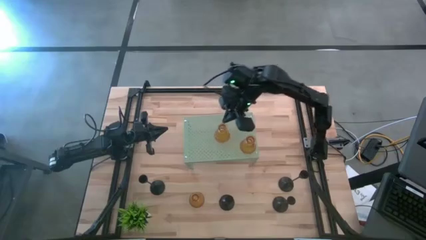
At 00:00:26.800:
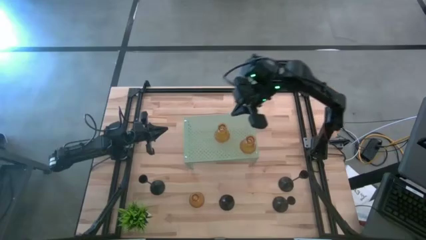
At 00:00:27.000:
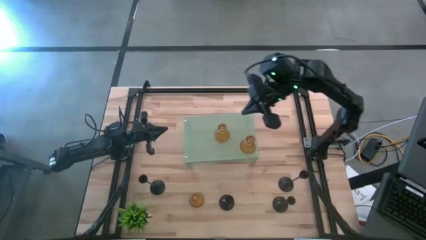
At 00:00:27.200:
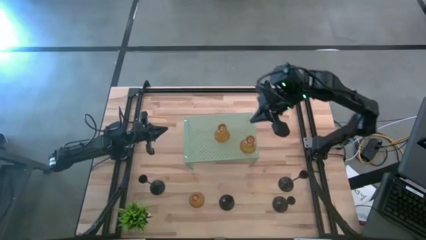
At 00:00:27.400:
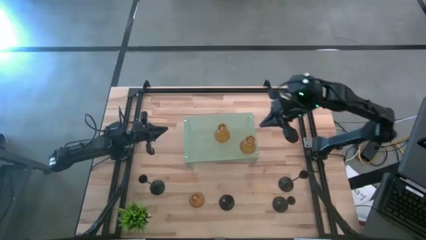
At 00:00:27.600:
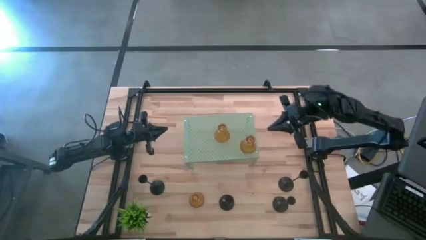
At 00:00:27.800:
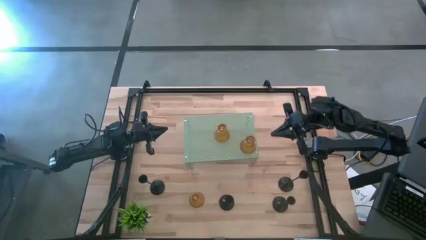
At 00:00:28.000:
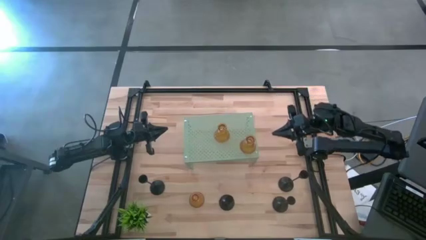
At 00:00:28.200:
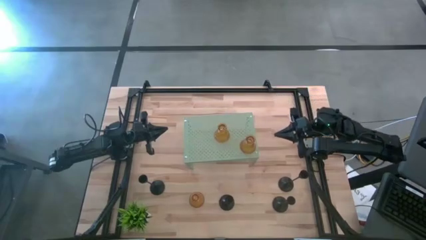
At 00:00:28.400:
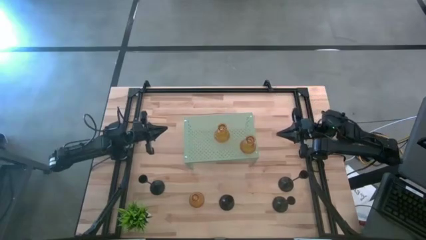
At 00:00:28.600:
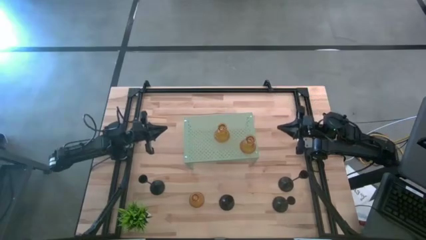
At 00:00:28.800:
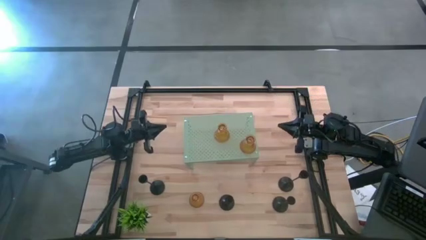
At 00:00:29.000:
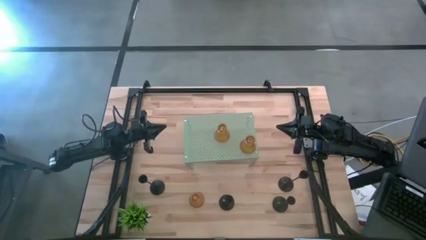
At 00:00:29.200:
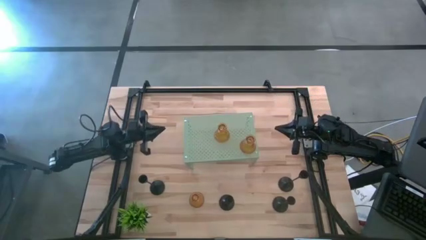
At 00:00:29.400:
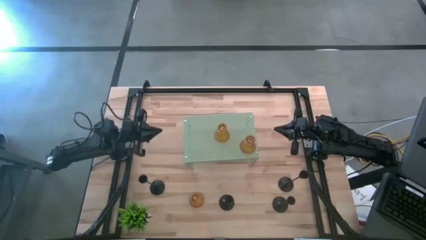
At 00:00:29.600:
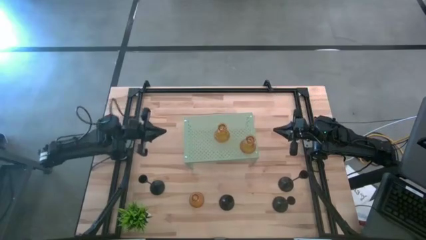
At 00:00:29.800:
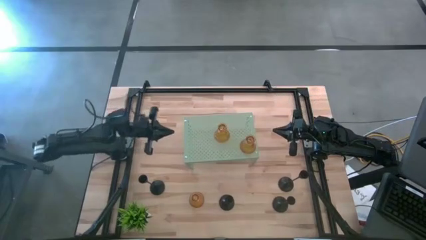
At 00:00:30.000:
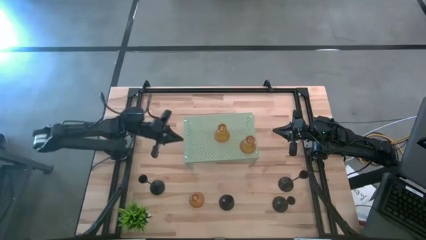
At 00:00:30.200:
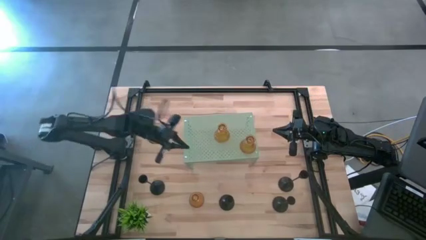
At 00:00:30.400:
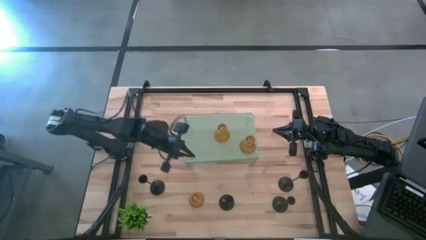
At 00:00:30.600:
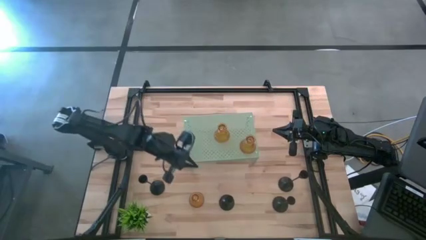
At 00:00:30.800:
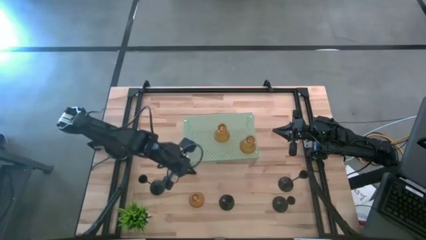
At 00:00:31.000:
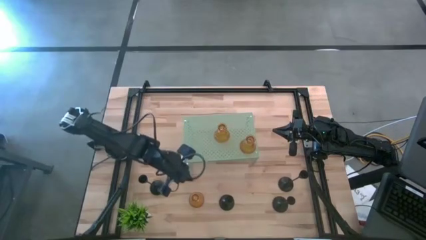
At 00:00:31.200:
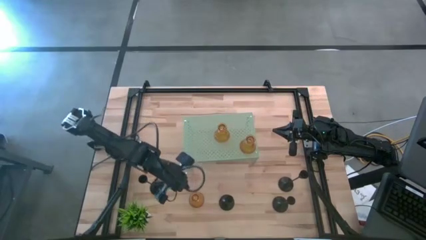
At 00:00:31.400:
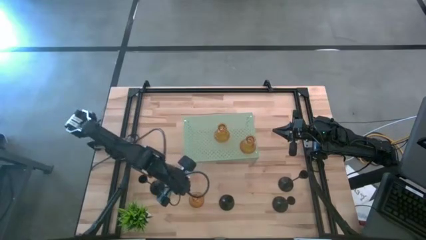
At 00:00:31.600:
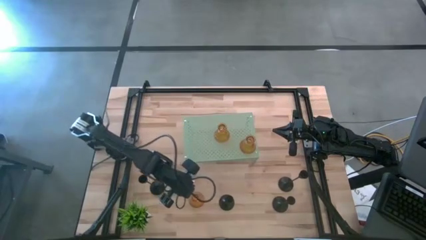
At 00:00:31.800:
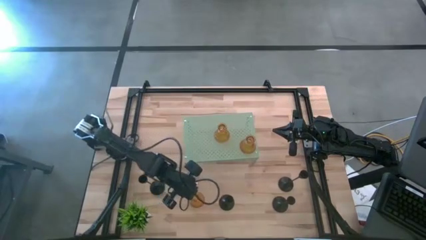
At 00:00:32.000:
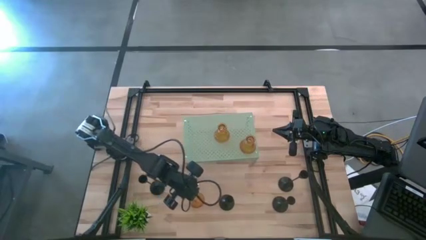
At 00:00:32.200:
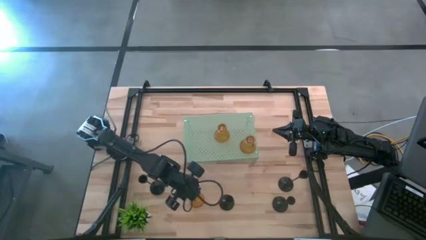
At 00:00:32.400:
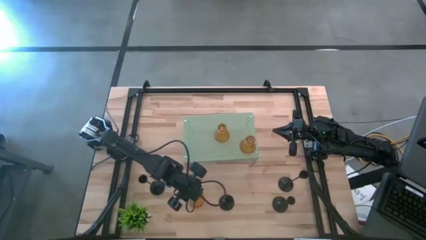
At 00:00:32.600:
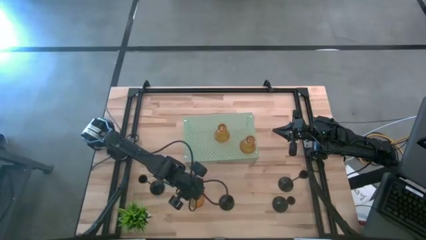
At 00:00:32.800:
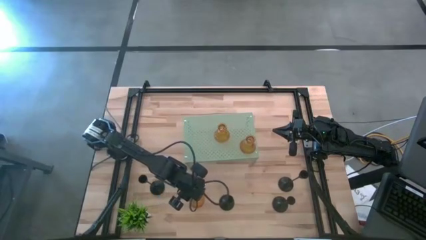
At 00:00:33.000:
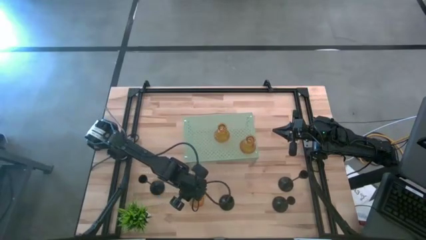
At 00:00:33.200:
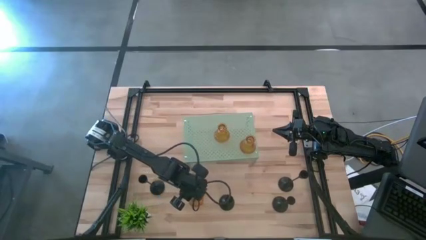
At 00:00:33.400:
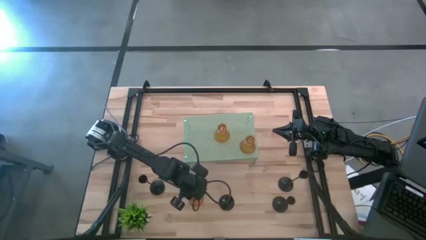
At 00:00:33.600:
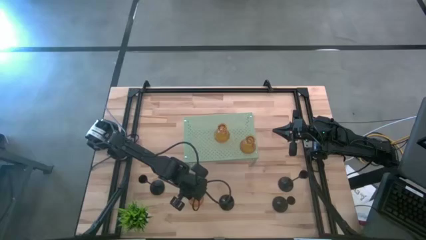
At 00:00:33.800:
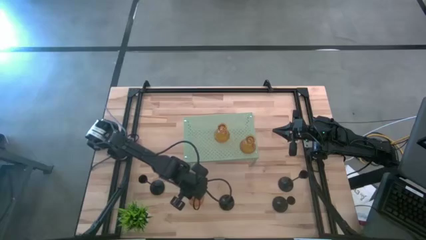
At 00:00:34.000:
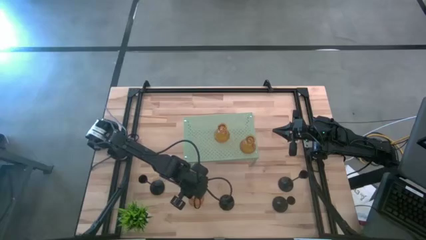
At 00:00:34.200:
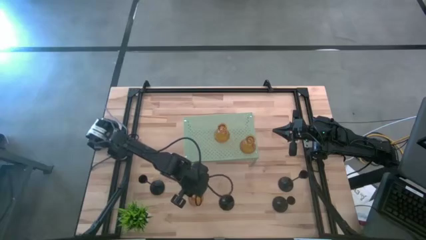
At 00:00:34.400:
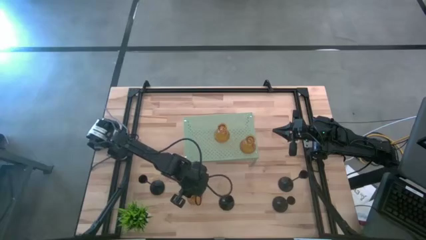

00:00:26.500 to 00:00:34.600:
Task: Pick & Place candle stick holders
Put the yellow glass candle holder on the shelf

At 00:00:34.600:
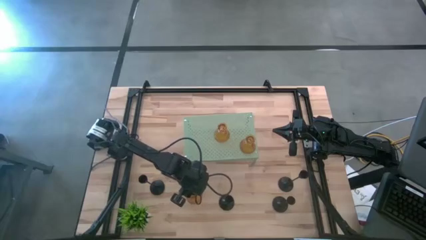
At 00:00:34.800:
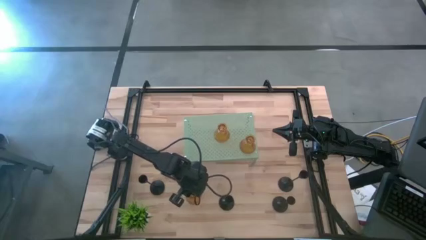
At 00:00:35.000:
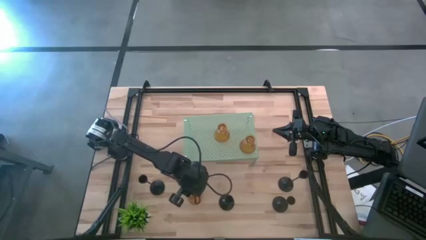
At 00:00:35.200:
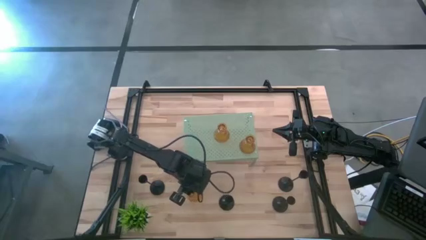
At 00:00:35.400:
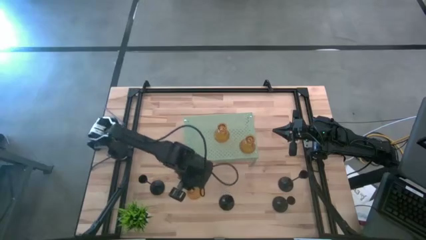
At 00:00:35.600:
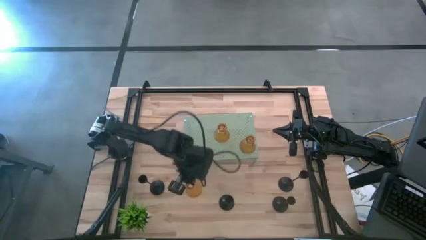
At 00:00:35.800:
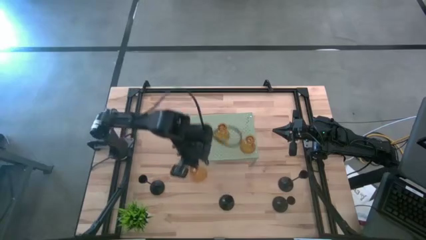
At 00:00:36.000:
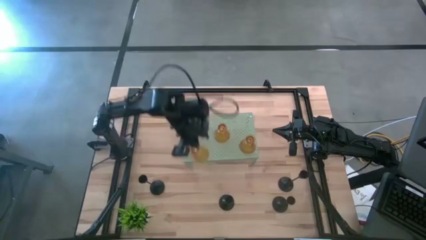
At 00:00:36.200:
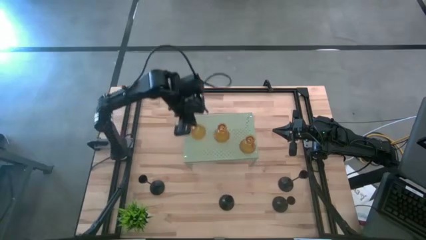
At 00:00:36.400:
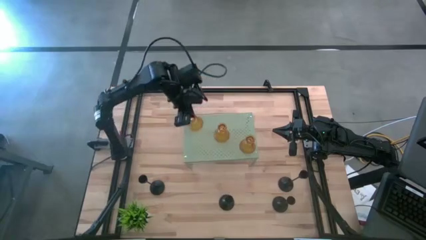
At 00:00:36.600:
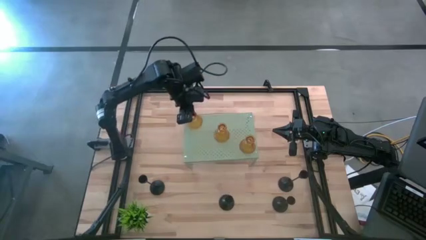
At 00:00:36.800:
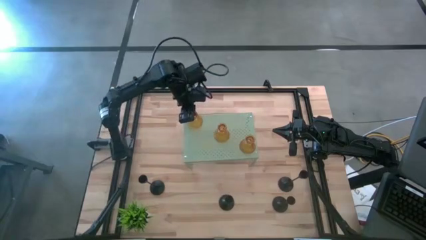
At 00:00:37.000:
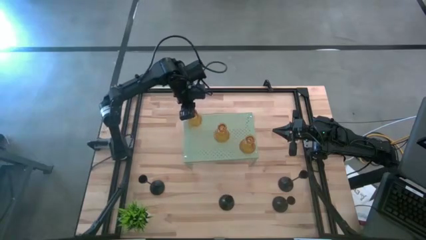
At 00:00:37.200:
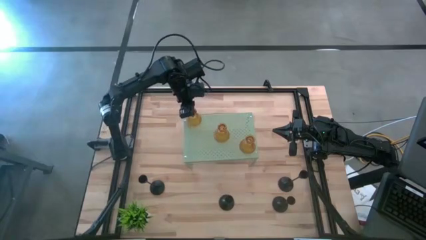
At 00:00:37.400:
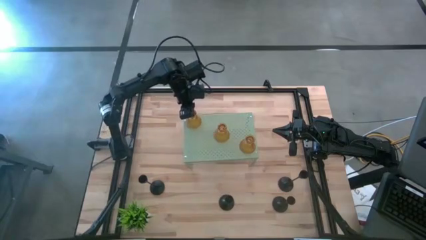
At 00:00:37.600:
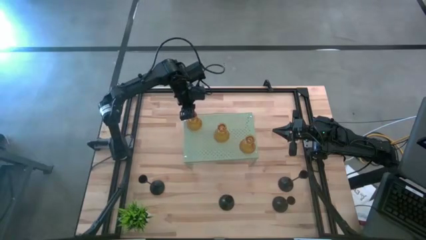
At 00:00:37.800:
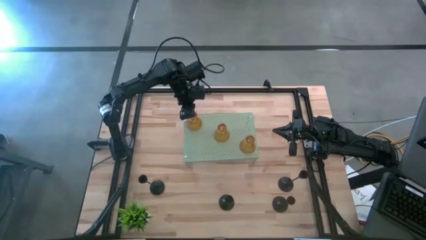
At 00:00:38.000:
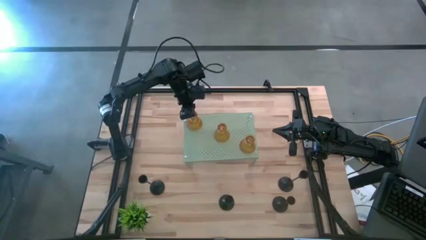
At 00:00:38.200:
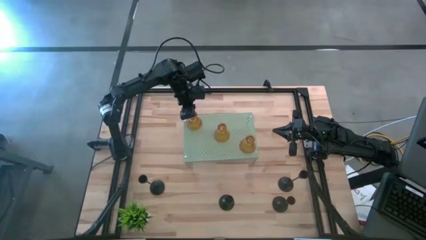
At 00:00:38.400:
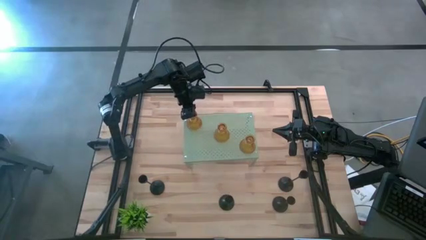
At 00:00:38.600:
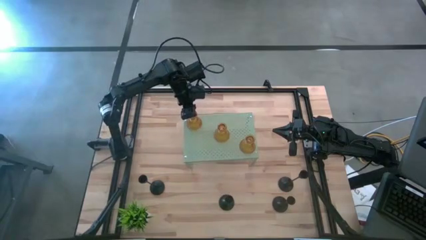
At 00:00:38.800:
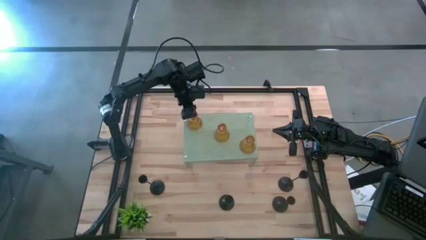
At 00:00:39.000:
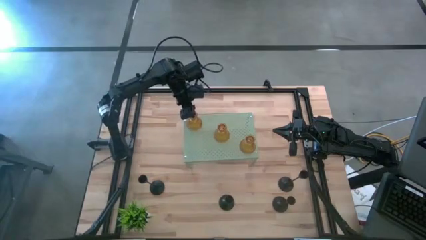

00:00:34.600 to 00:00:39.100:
Put the yellow glass candle holder on the shelf
